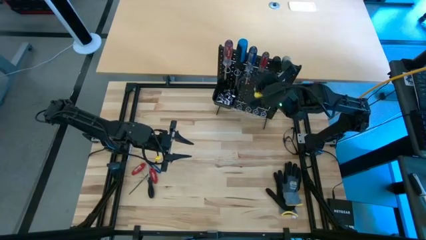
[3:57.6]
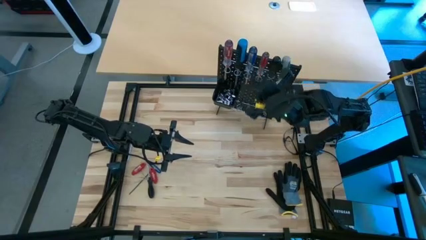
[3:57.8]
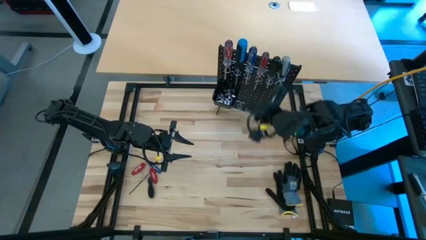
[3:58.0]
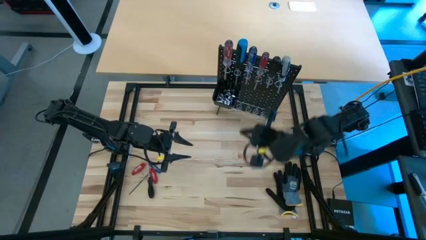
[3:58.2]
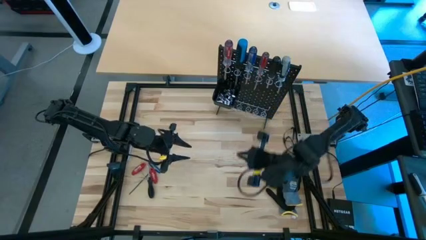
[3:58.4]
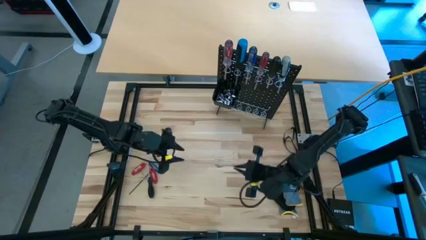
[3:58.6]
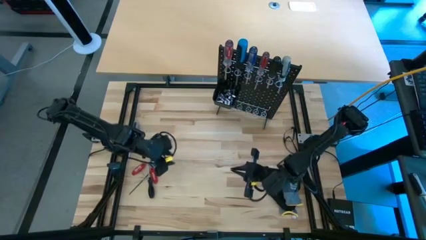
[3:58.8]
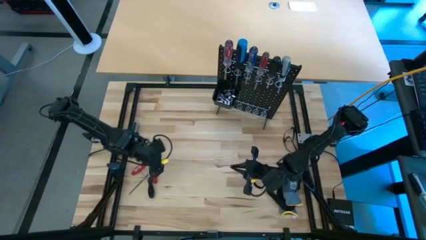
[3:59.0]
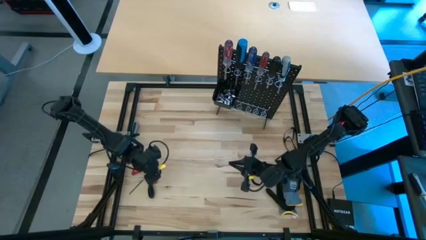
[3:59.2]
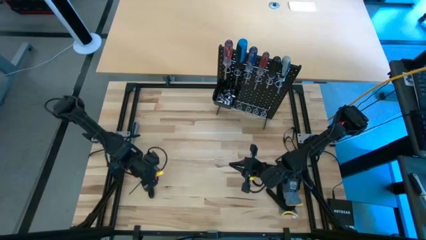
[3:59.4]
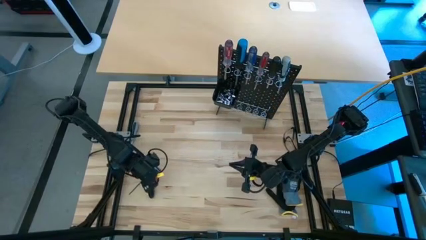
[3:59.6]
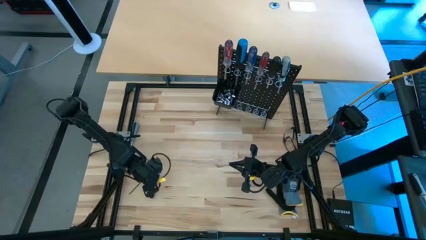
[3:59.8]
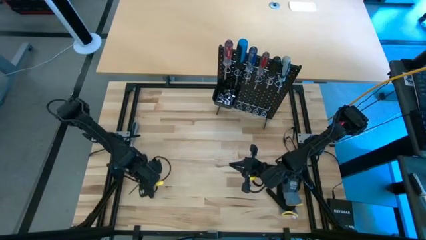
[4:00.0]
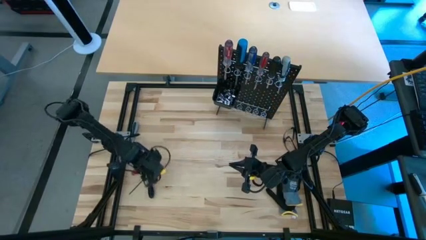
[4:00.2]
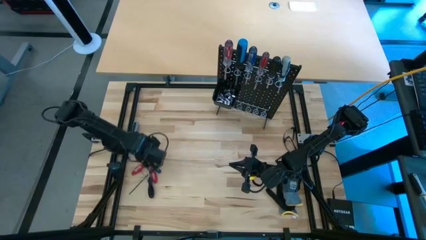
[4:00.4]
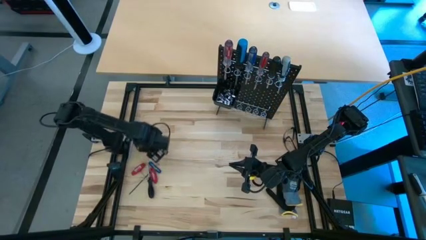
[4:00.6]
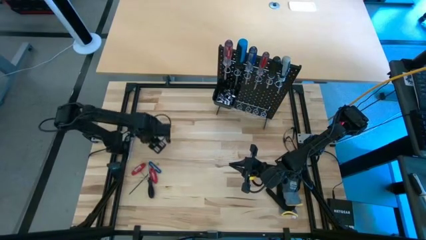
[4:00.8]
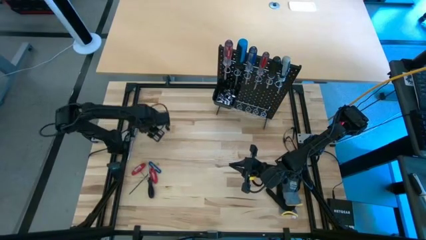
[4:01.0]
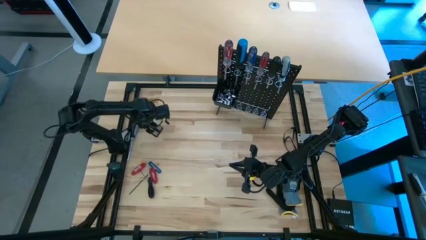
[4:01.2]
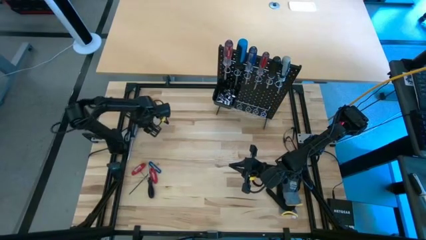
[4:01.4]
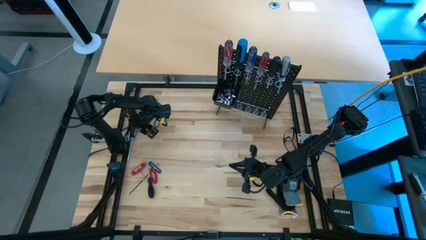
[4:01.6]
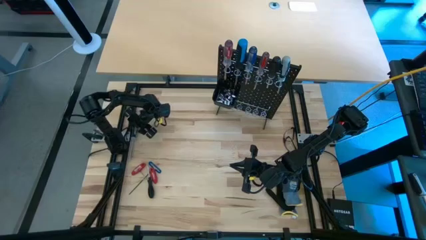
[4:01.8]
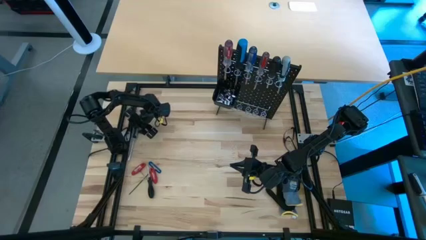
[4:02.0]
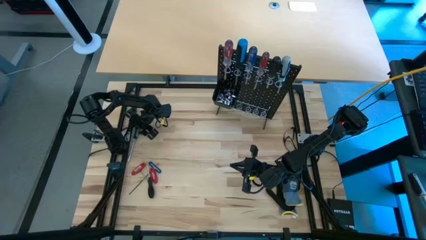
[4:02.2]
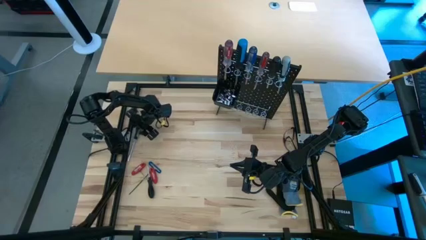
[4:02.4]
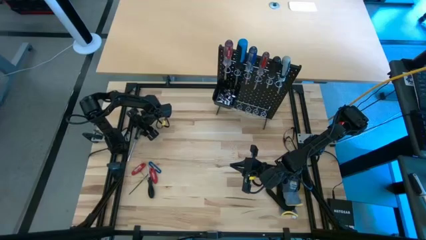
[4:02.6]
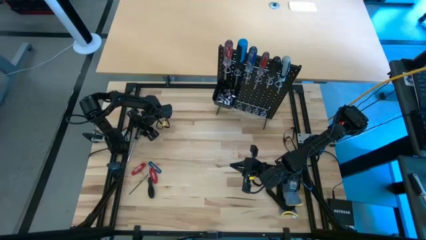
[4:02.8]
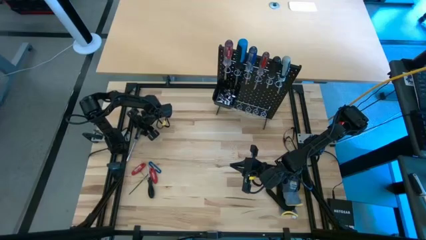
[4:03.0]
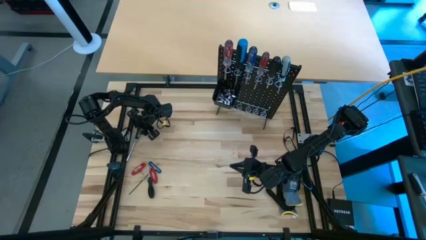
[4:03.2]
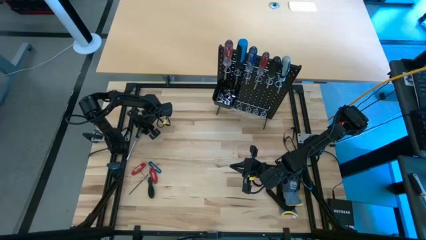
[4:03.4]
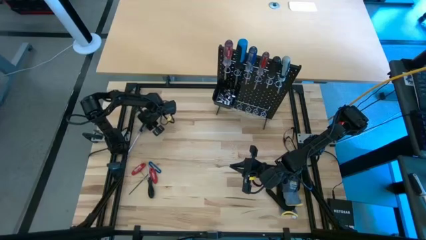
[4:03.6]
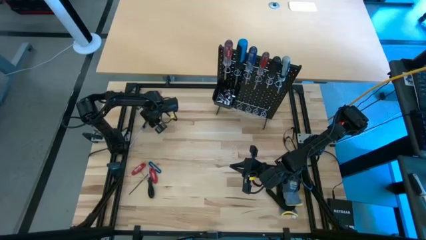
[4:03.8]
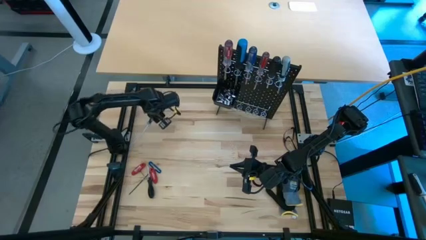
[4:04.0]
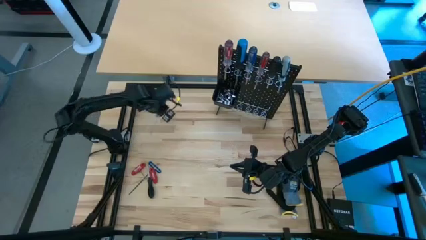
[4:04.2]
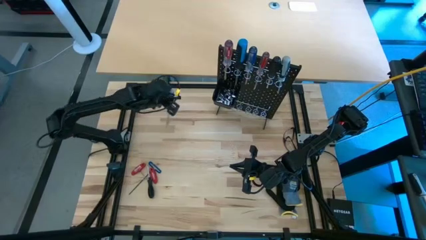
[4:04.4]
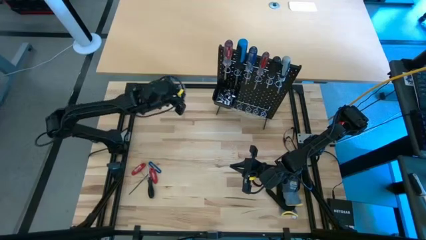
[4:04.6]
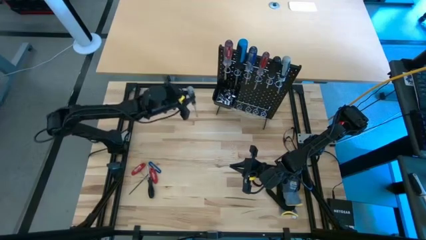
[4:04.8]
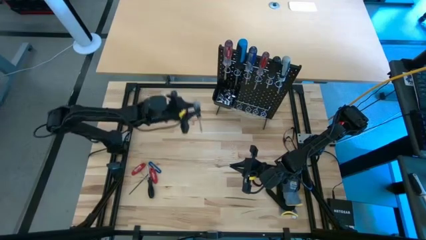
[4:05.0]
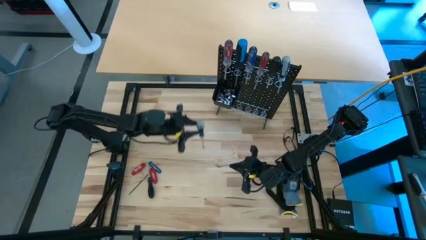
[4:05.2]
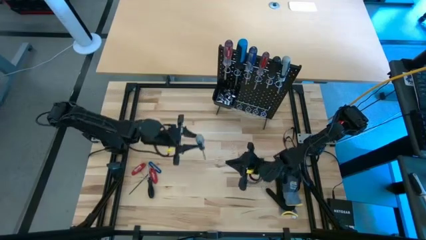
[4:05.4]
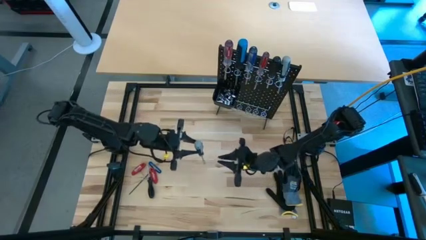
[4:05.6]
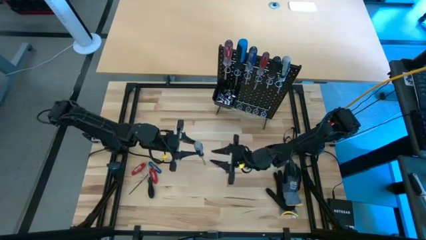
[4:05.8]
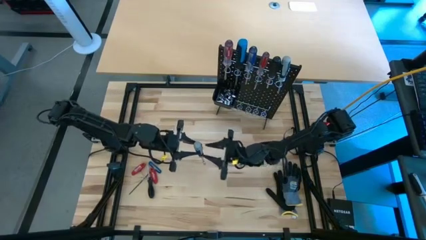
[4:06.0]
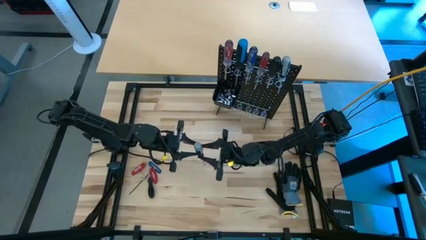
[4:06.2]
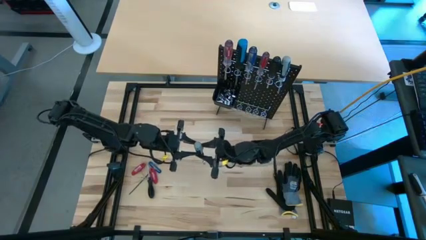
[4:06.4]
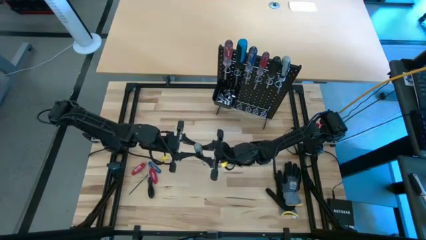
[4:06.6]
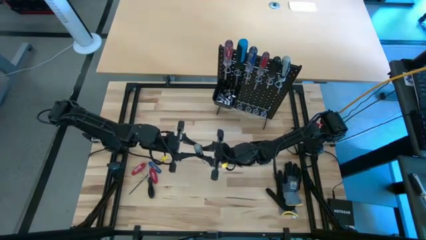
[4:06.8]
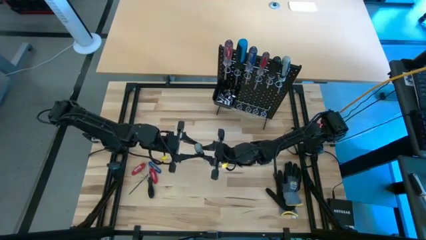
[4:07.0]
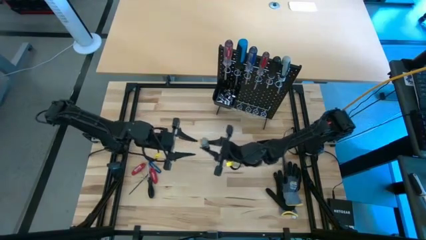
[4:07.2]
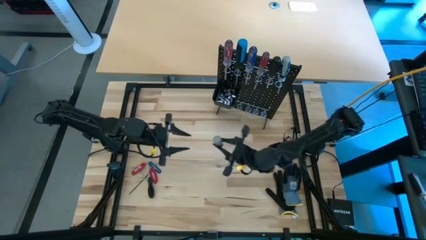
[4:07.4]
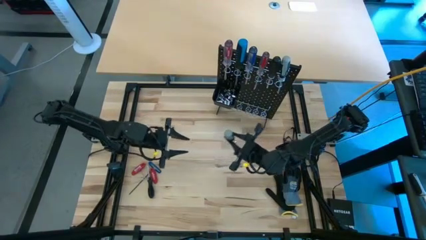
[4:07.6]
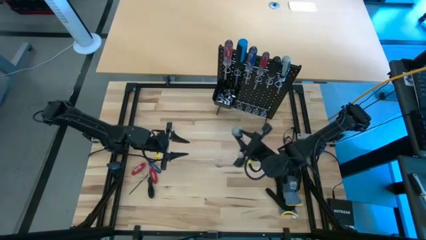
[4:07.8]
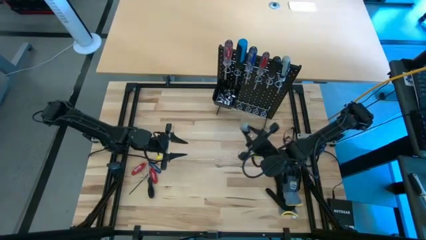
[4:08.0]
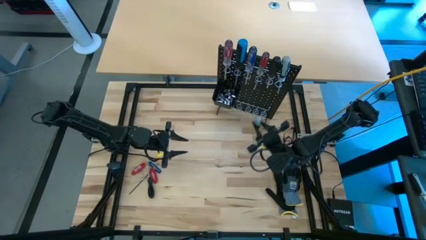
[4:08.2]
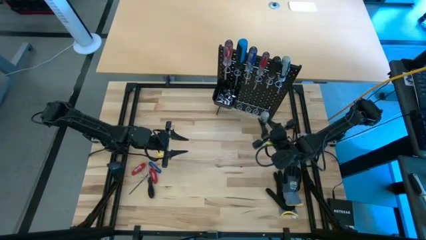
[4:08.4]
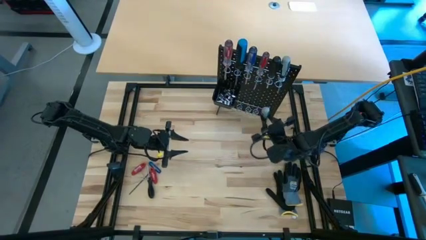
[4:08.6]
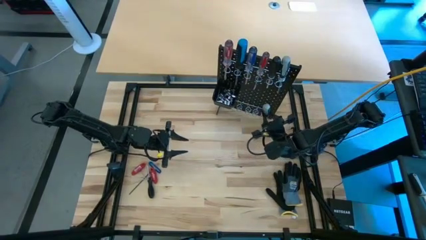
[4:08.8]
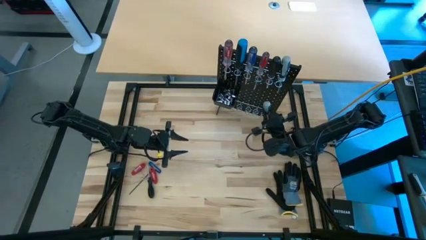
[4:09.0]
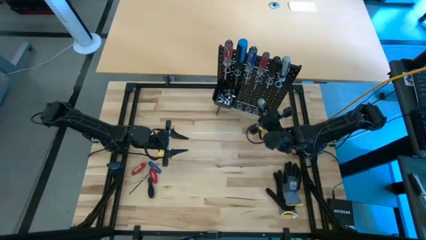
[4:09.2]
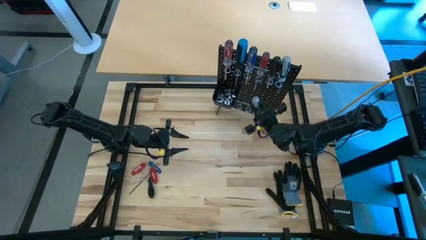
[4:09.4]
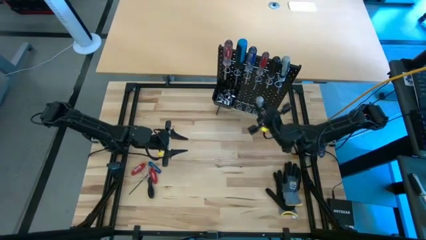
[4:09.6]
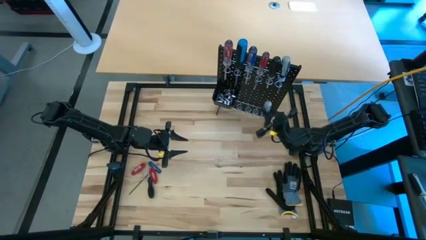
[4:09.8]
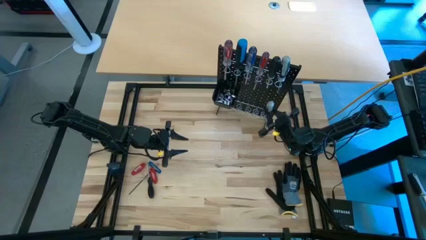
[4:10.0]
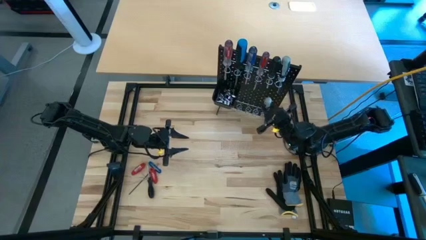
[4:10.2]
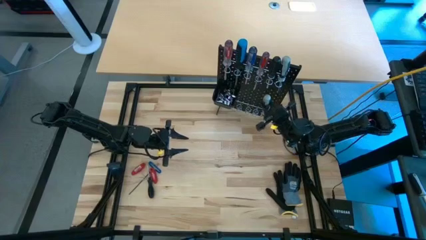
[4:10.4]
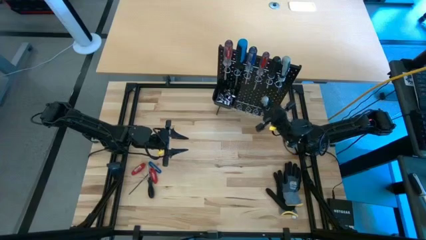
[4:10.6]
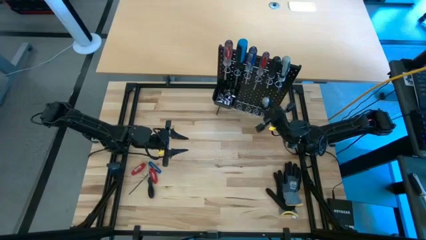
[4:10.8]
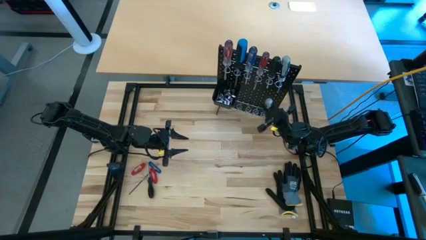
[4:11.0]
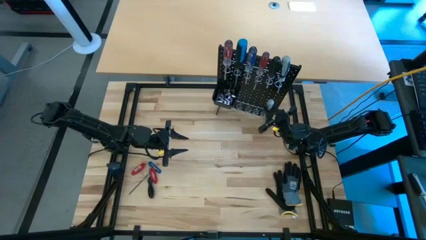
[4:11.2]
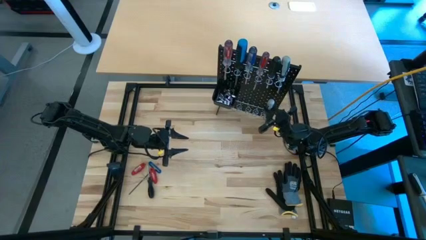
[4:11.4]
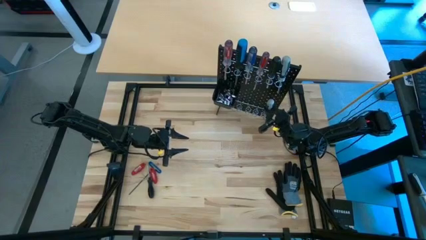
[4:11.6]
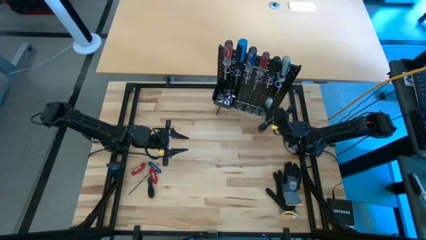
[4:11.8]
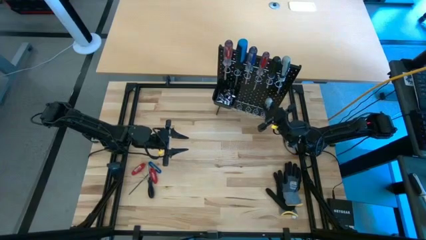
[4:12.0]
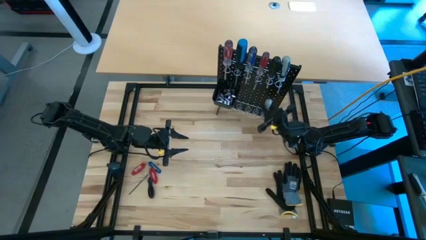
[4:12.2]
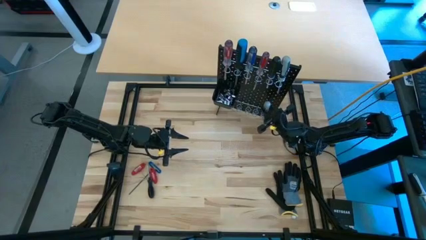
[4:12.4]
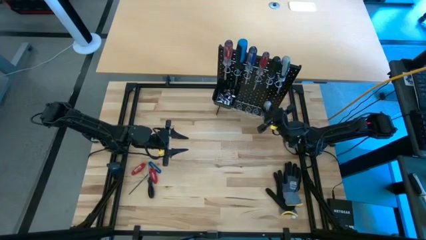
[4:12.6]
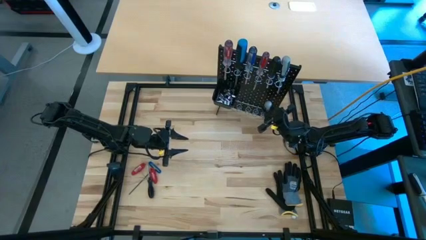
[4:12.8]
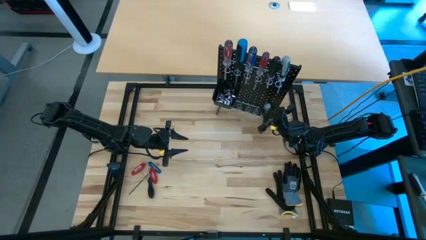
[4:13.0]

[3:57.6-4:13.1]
Task: Hang tools onto peg board
Hang the gray screwdriver on the black pegboard
